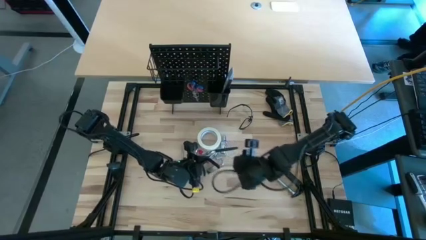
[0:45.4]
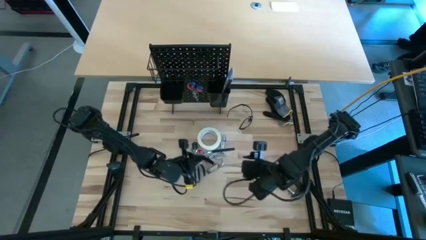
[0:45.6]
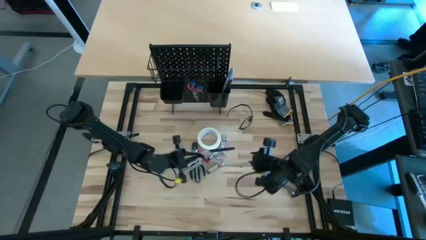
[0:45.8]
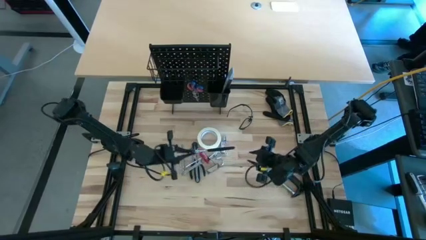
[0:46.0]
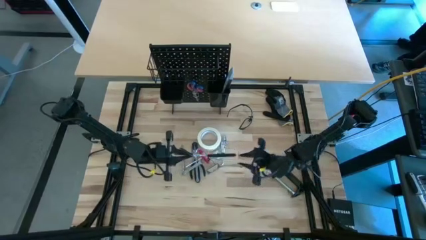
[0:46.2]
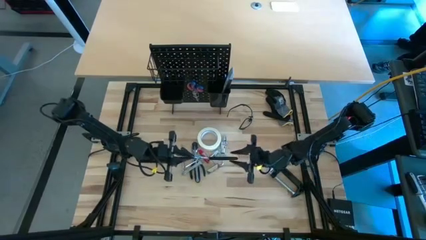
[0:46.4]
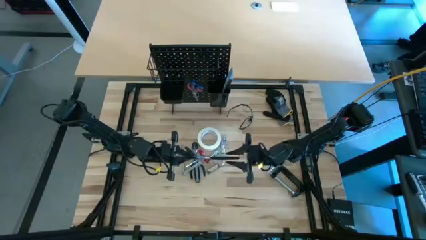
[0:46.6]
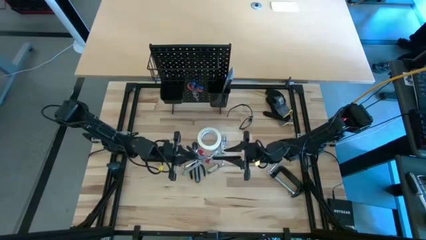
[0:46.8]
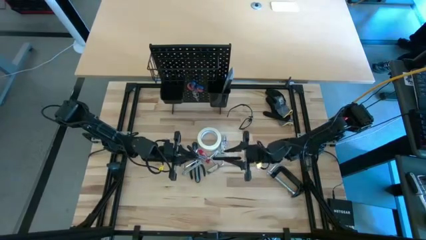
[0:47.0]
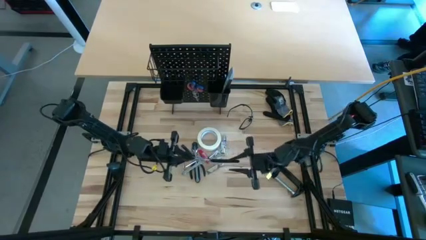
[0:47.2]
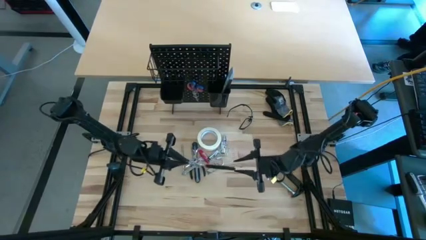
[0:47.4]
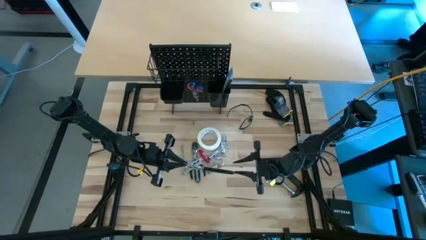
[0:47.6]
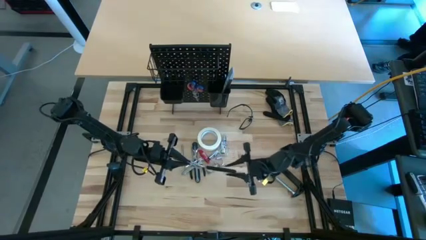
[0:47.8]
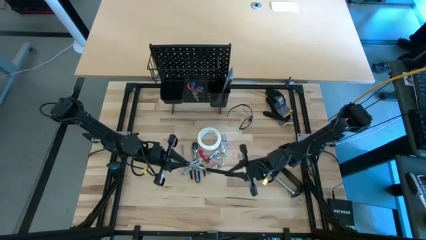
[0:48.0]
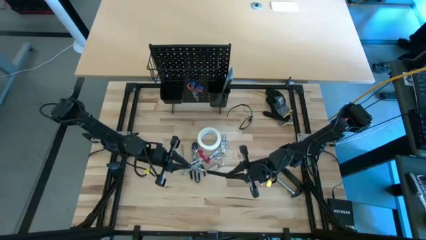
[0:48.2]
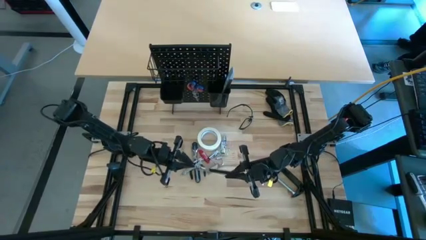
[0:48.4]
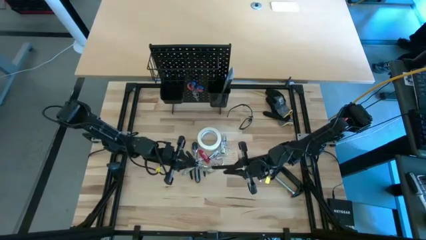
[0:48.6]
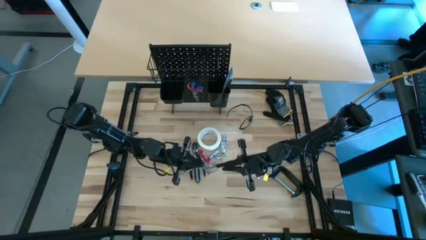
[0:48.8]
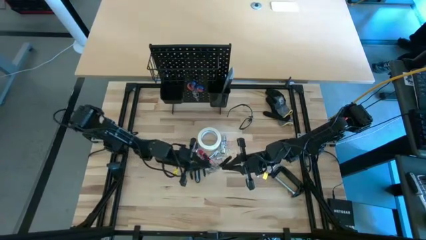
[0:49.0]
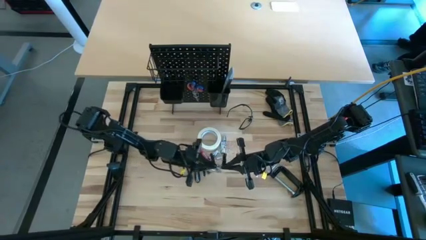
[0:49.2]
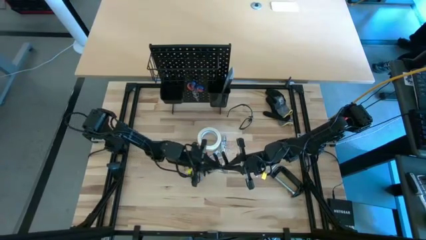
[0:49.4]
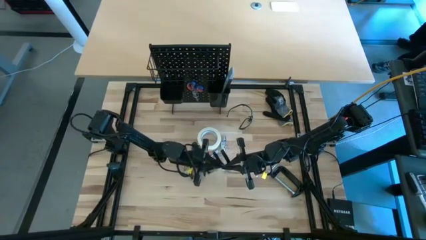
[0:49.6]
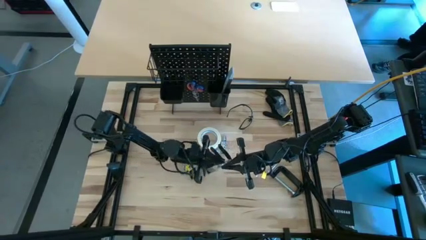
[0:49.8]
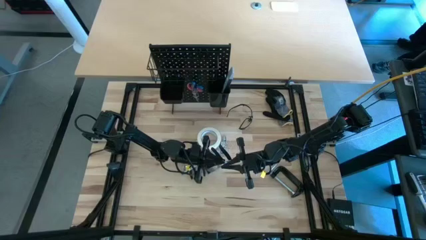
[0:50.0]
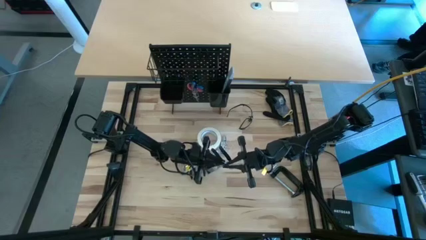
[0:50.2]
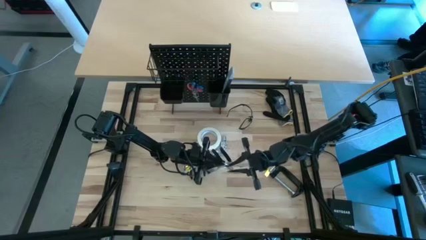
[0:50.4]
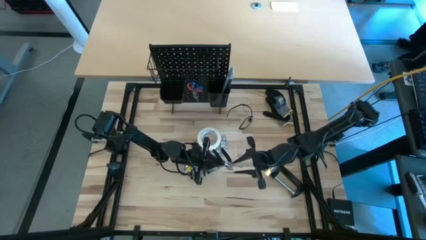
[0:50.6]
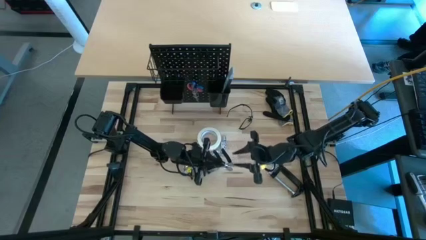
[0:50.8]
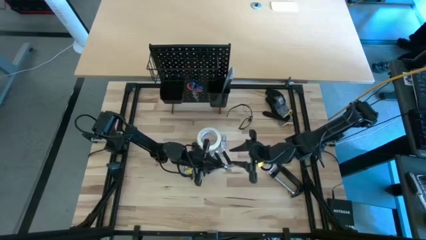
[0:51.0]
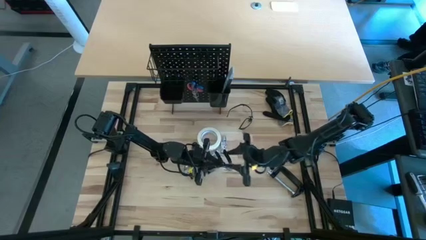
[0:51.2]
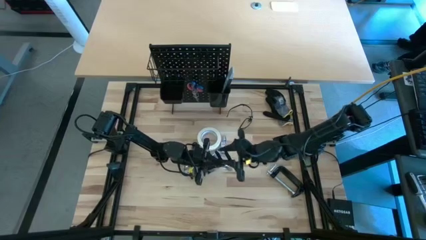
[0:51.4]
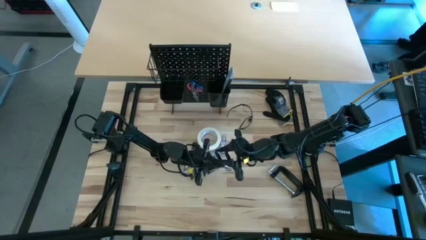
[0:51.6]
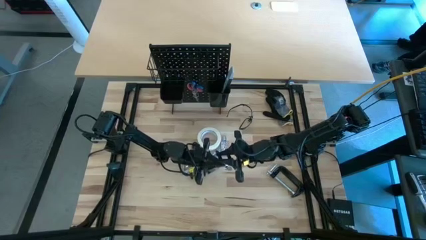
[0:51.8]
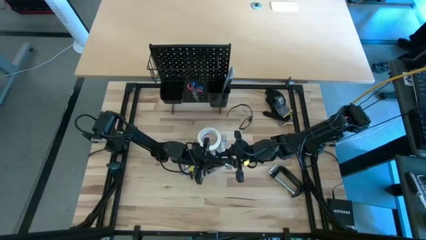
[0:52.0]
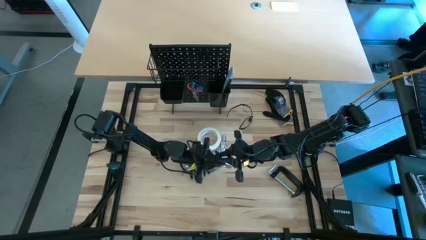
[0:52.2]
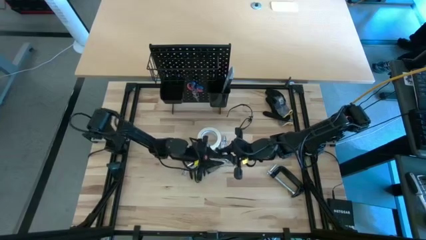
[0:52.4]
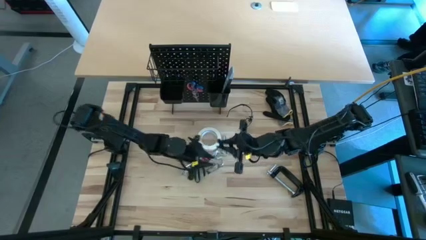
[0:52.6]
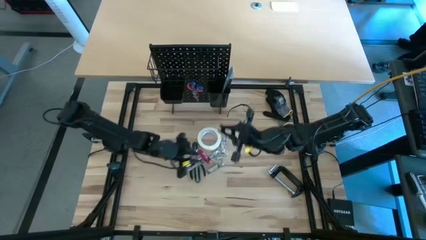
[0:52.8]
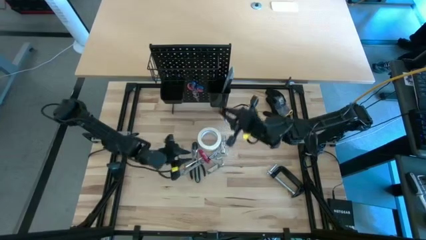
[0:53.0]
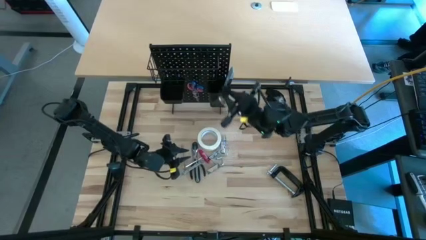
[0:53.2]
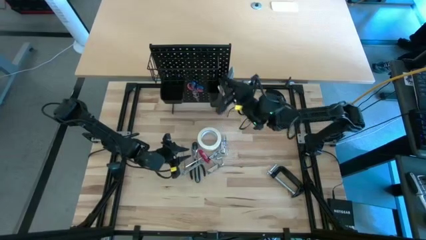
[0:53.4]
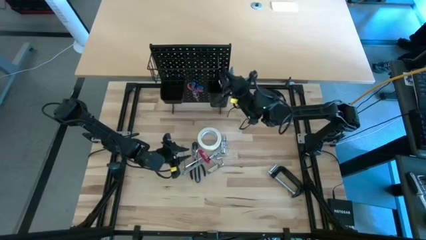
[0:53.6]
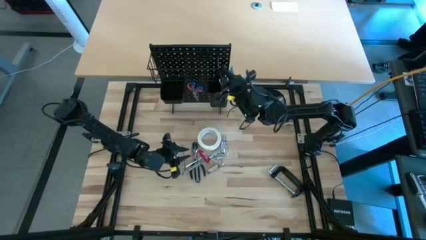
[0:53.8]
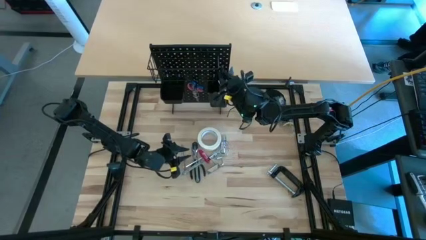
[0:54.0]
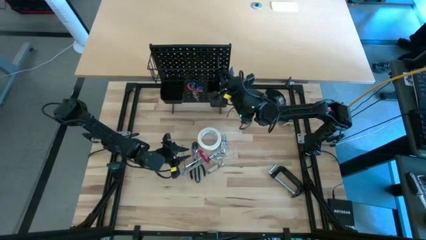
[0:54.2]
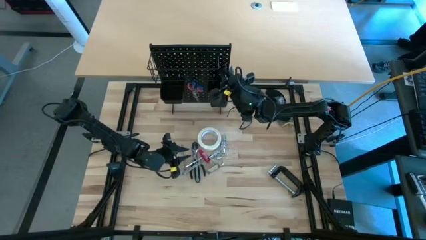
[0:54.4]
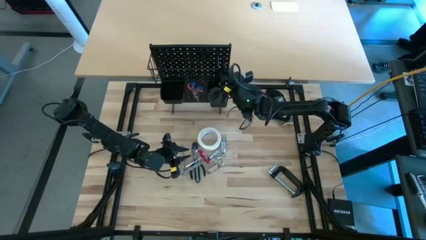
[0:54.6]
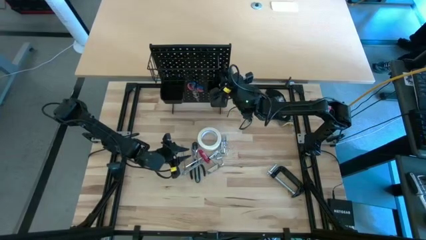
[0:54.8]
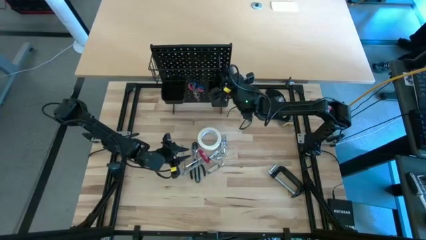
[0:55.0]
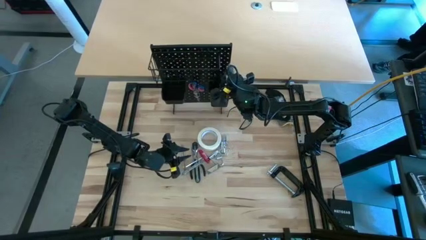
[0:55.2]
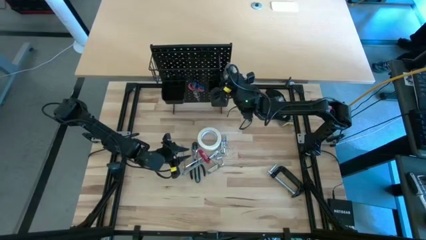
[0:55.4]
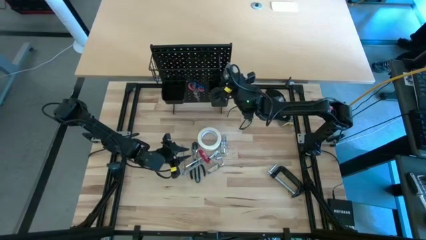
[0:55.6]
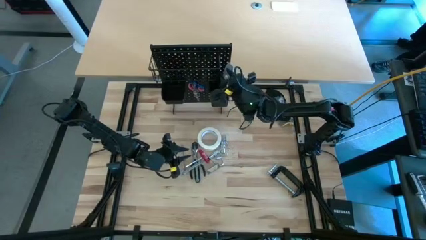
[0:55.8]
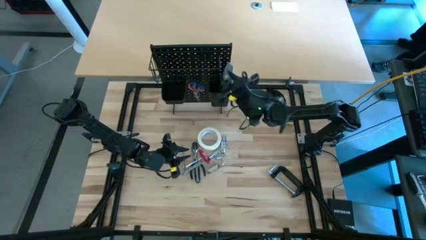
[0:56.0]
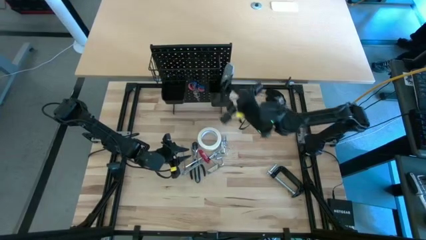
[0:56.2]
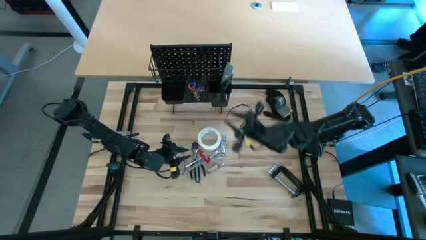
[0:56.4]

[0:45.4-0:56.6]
Task: Hang tools onto peg board
Put the black slip-joint pliers into the right black bin on the peg board

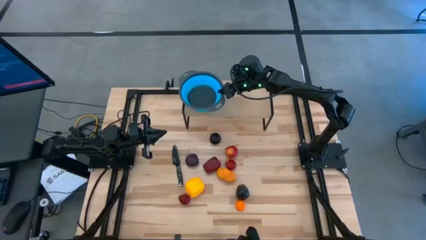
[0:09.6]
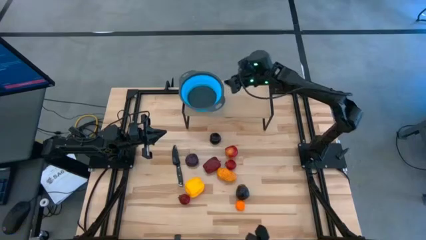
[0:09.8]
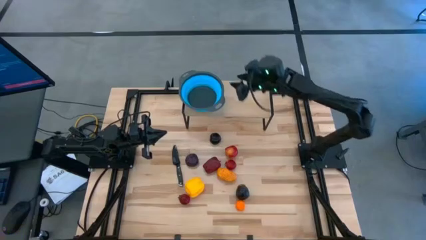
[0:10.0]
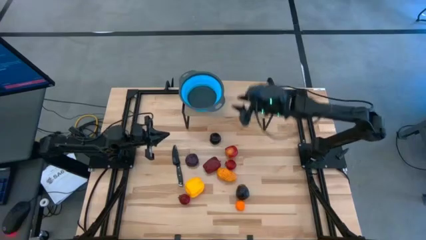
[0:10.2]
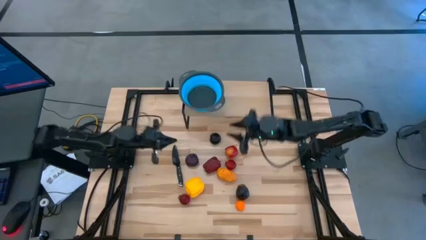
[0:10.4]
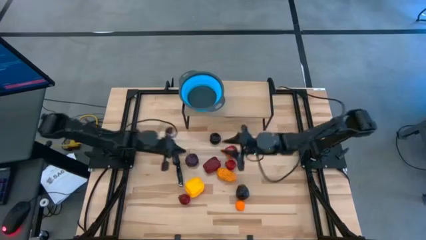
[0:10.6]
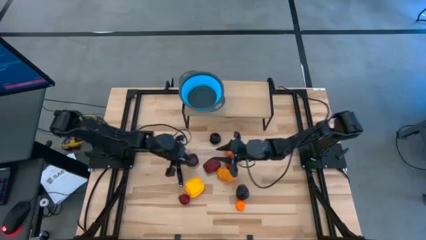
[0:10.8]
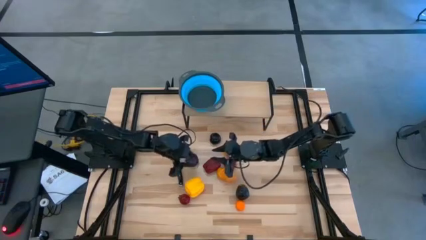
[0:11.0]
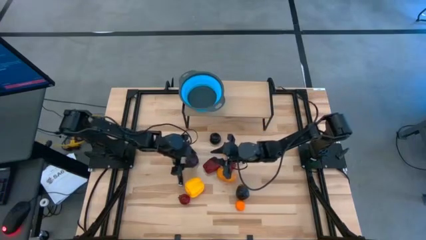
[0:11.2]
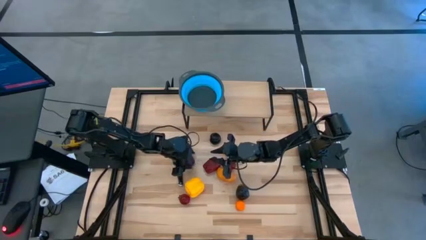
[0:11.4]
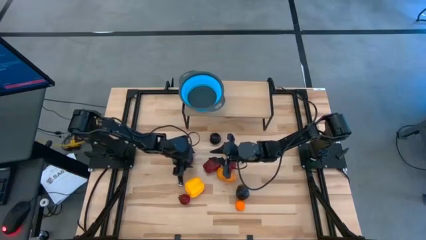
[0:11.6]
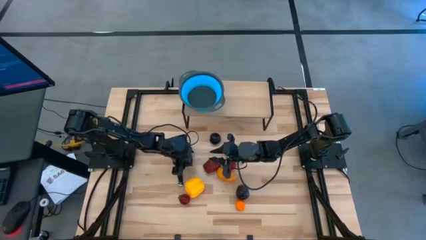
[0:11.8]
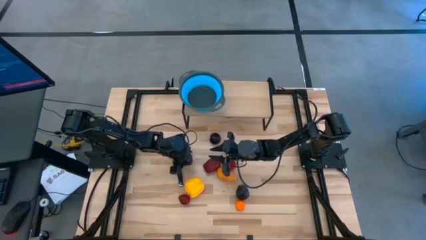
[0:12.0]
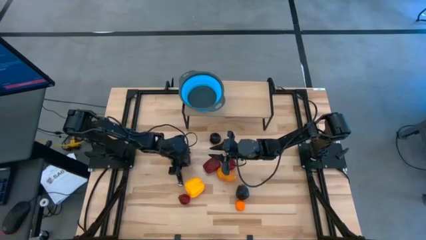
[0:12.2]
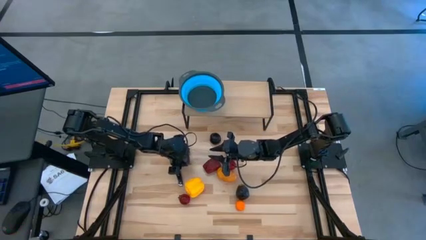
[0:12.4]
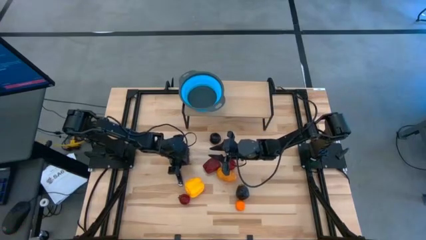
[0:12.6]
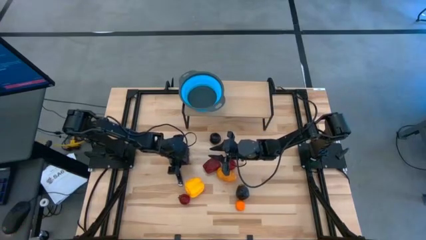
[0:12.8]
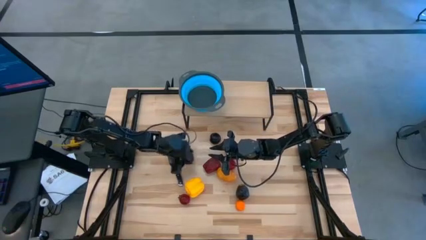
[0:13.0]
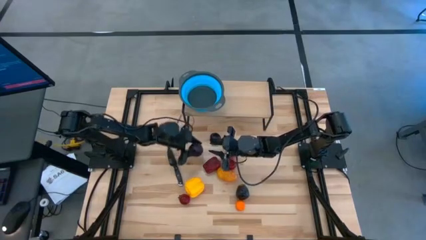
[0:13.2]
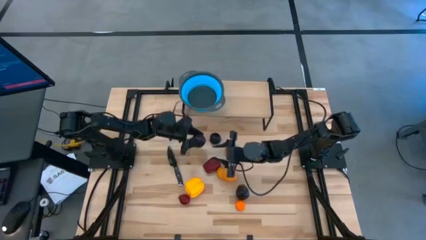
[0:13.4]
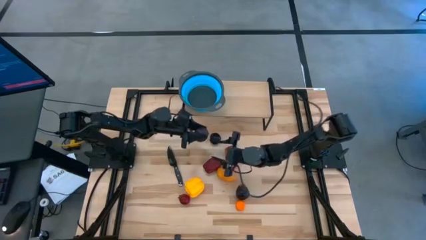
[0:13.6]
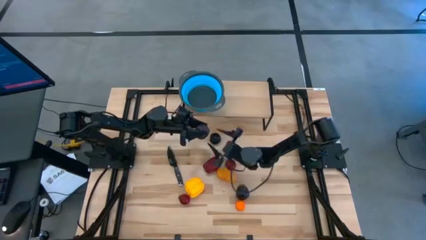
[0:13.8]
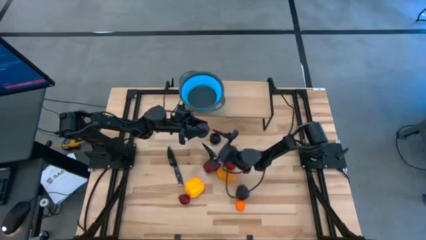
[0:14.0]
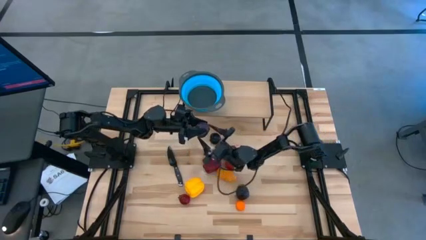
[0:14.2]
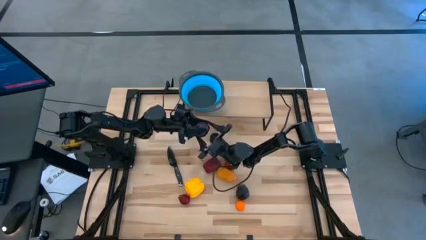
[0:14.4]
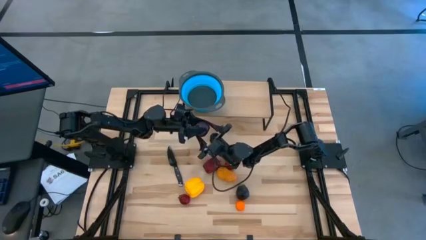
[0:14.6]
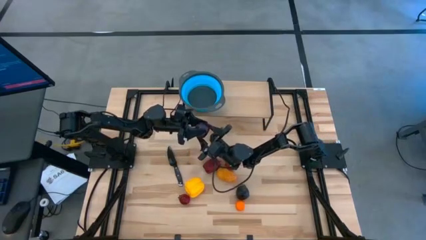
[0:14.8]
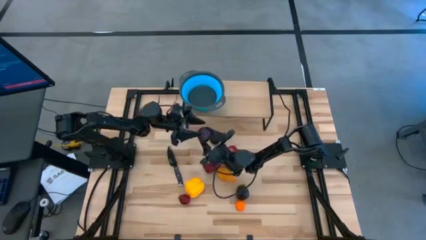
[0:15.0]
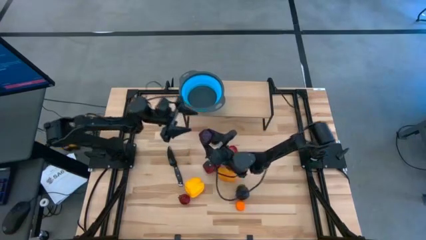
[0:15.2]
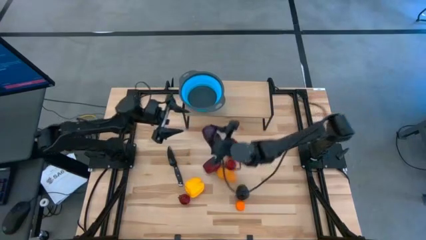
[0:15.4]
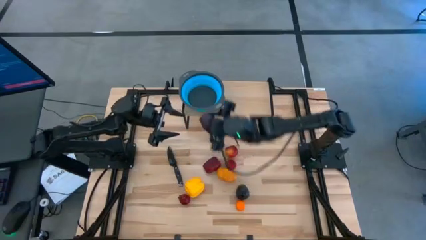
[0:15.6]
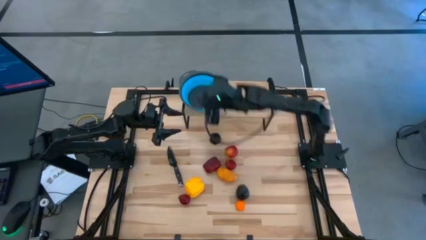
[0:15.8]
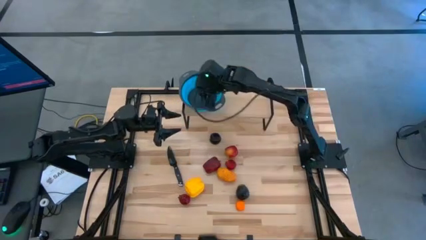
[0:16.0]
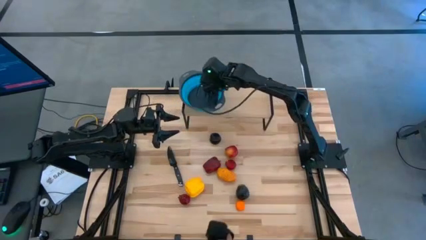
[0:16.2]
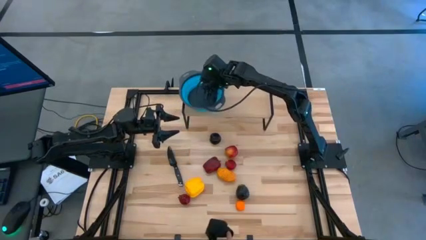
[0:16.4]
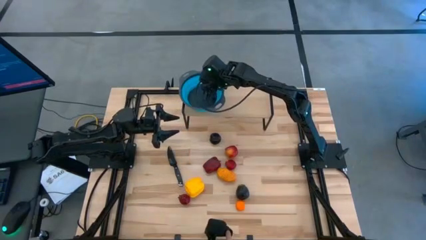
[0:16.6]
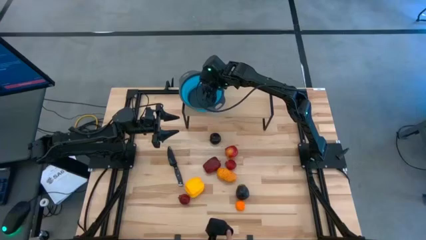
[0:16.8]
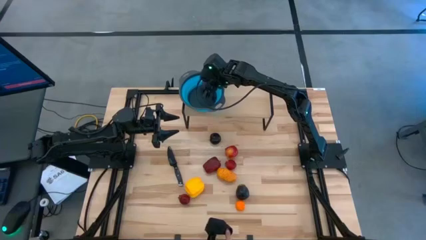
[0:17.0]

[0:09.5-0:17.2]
Task: Pick & Place Fruit
Put the bottom black plum into the blue strainer bowl on the shelf
